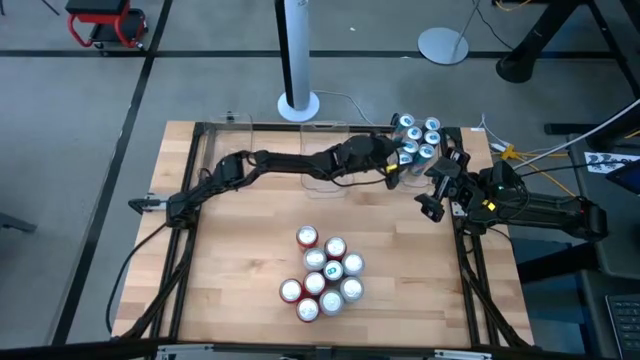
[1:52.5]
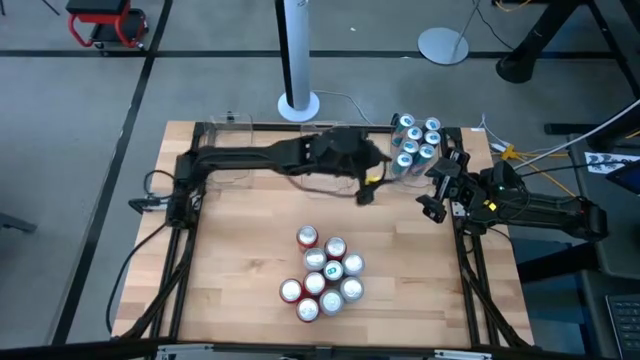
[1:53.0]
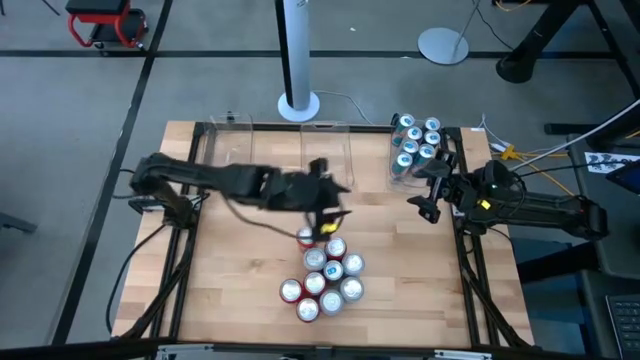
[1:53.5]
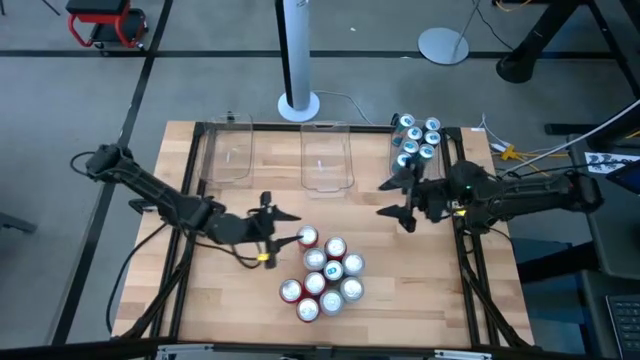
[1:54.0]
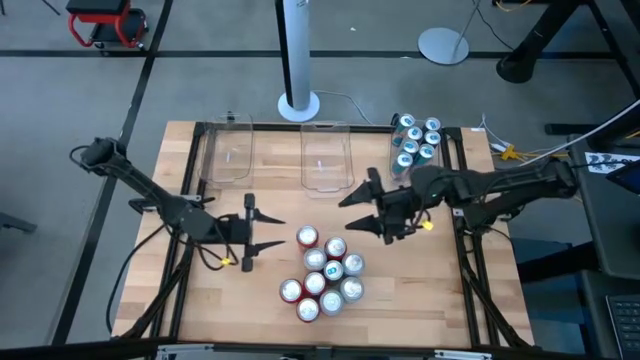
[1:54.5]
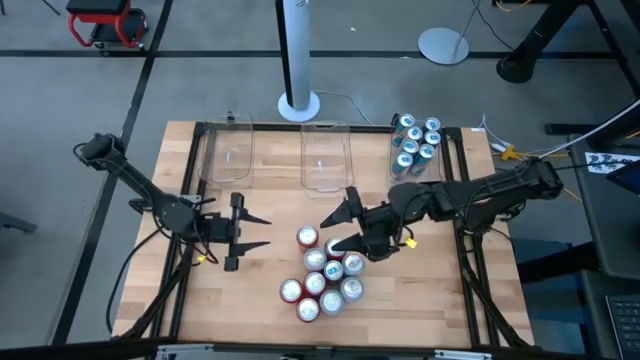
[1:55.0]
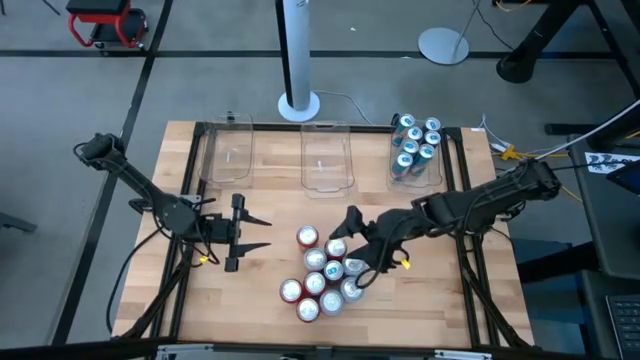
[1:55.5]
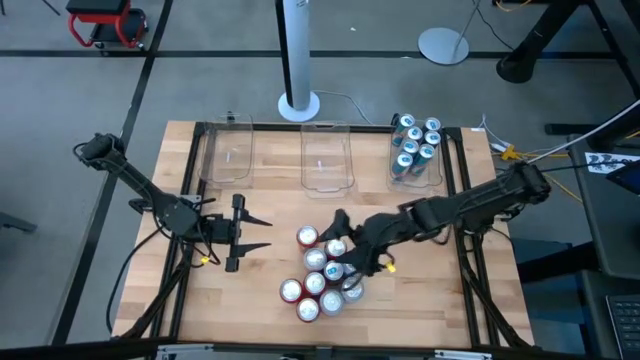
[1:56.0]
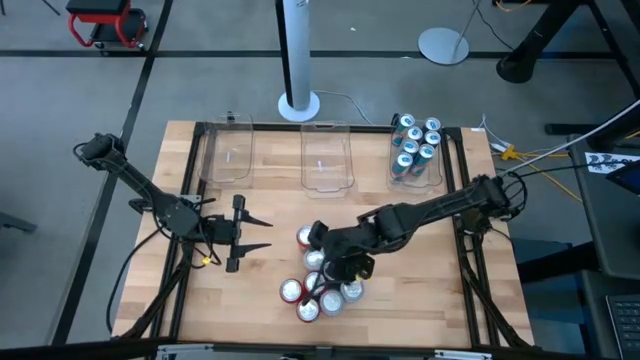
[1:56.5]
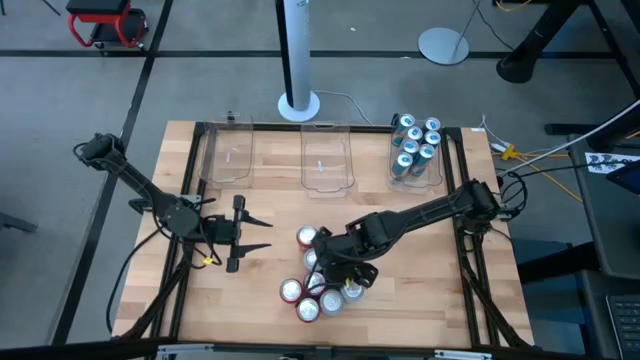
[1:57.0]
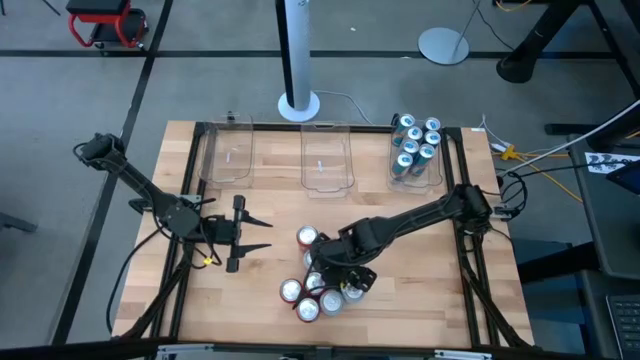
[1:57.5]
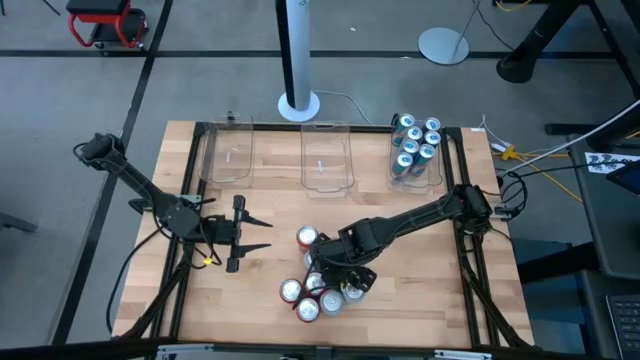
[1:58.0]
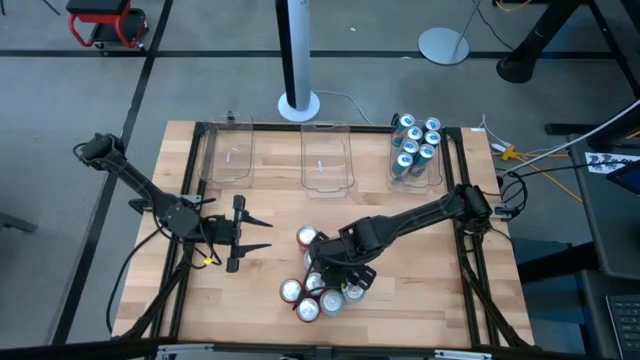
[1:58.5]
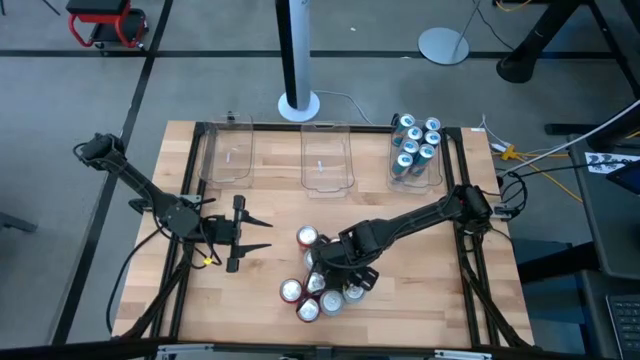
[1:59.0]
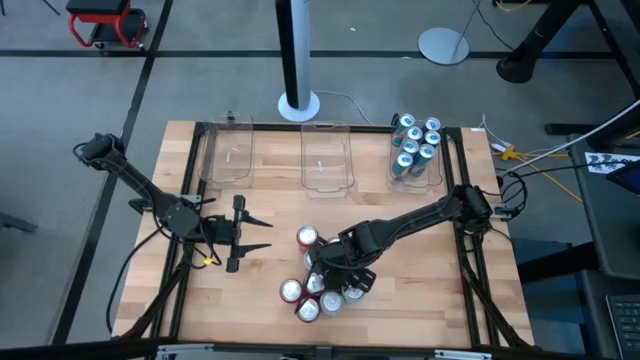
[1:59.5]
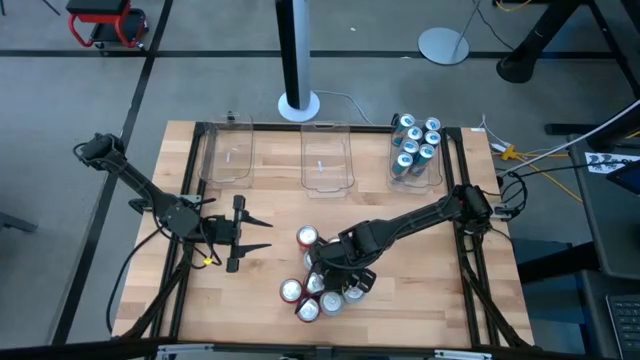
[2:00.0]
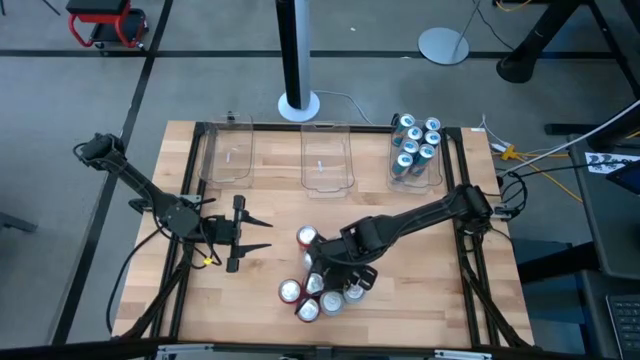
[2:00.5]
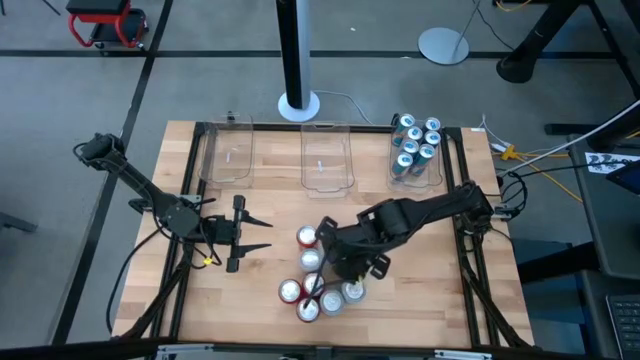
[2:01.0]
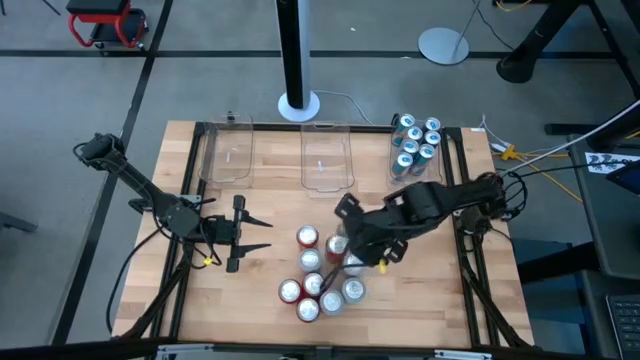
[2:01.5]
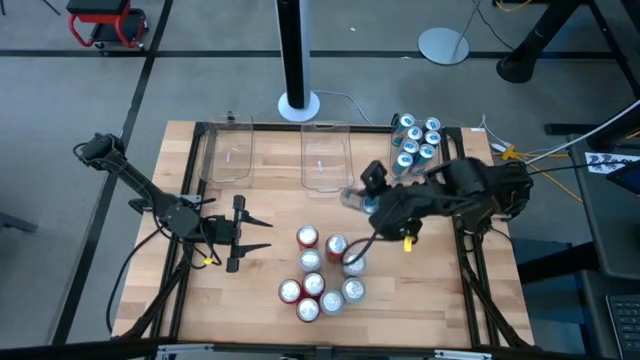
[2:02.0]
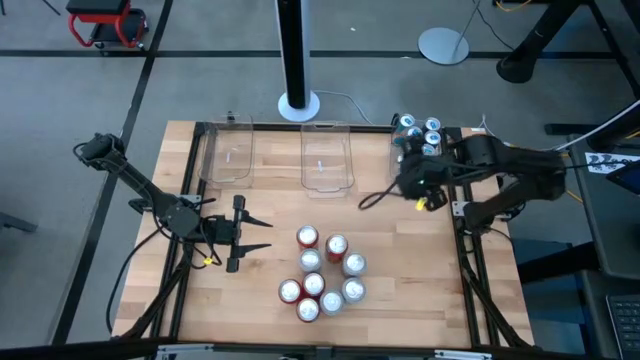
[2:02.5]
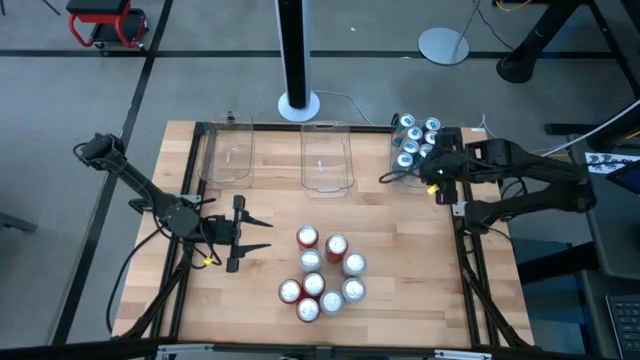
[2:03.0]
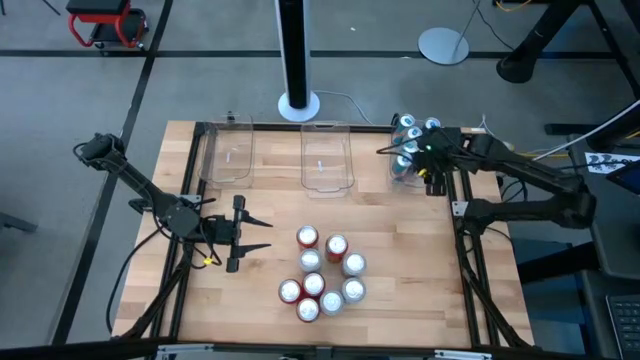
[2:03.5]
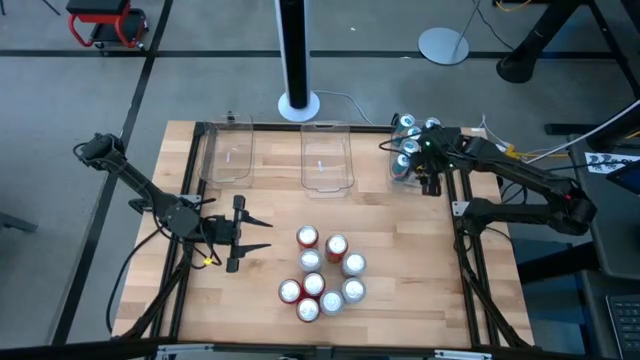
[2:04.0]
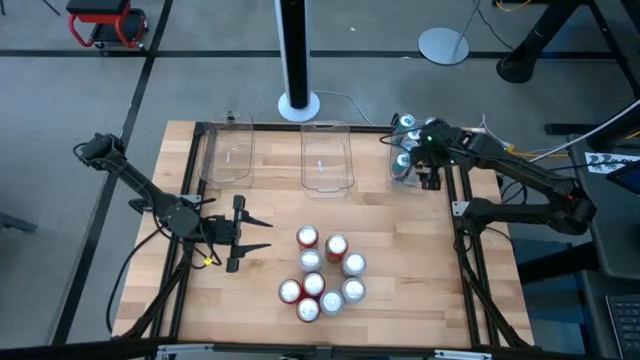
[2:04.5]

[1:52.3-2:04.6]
Task: Sort soda cans
Put the blue soda can into the top right transparent bin

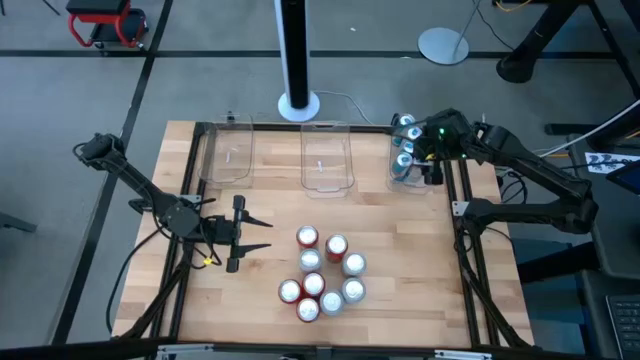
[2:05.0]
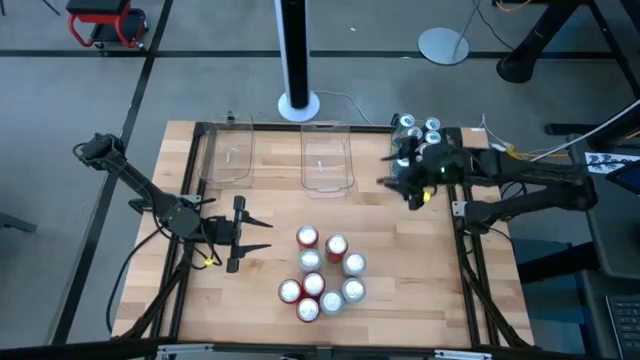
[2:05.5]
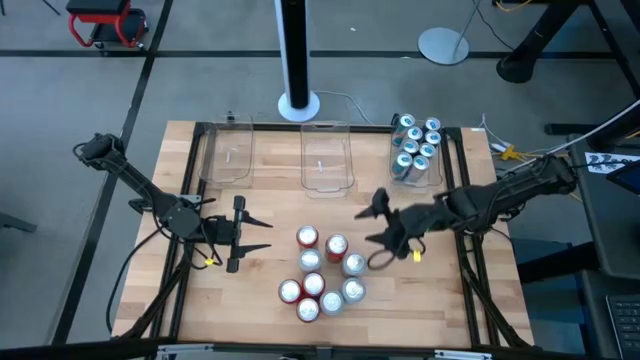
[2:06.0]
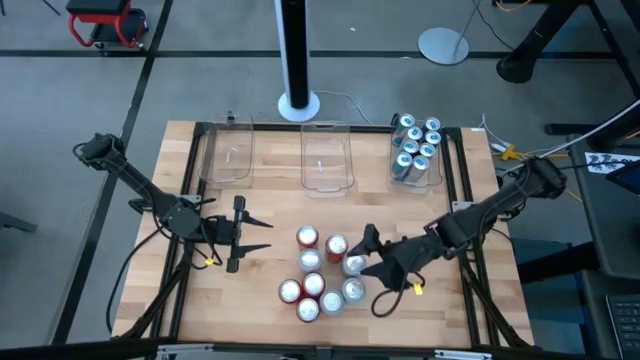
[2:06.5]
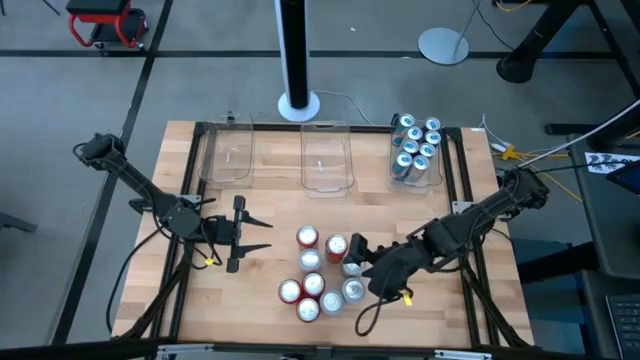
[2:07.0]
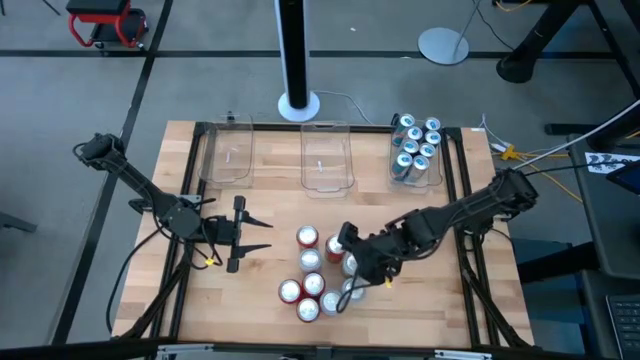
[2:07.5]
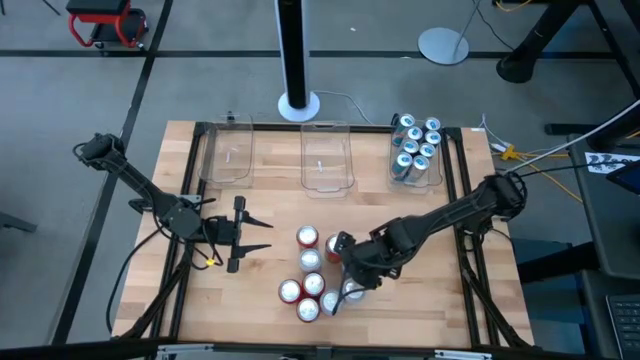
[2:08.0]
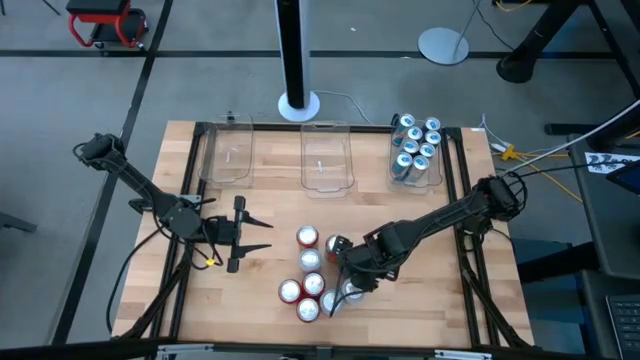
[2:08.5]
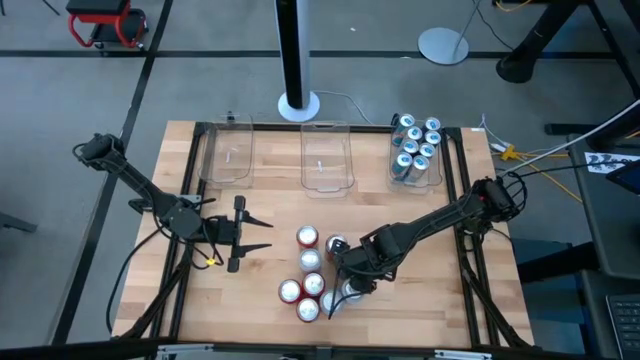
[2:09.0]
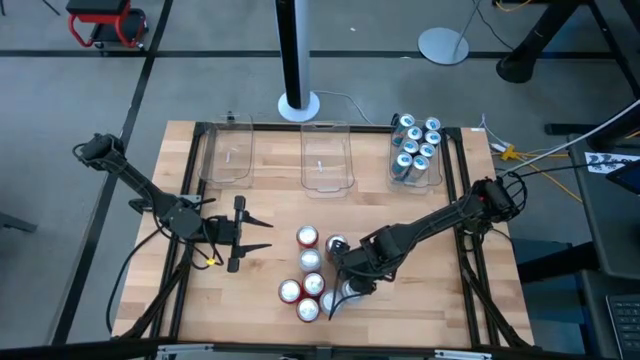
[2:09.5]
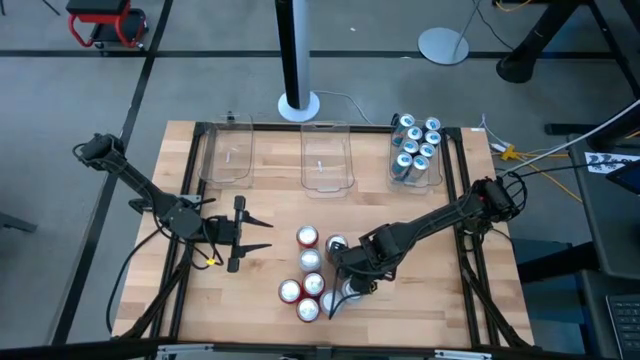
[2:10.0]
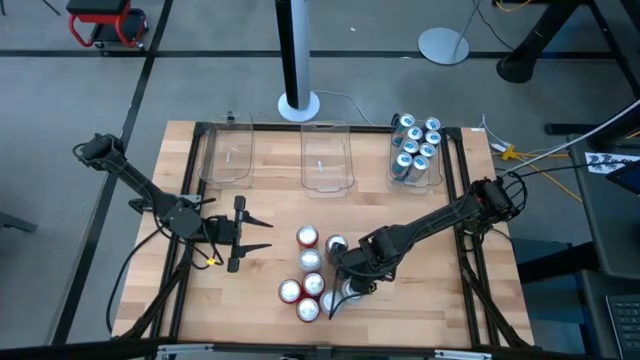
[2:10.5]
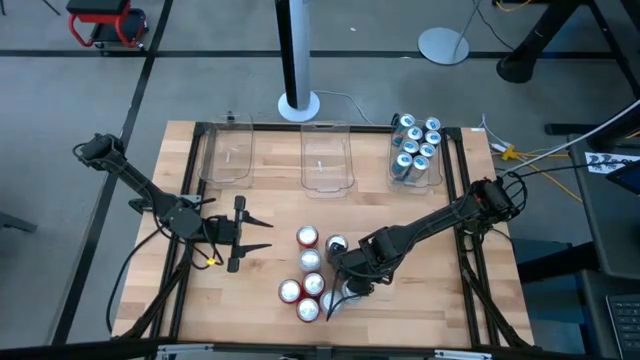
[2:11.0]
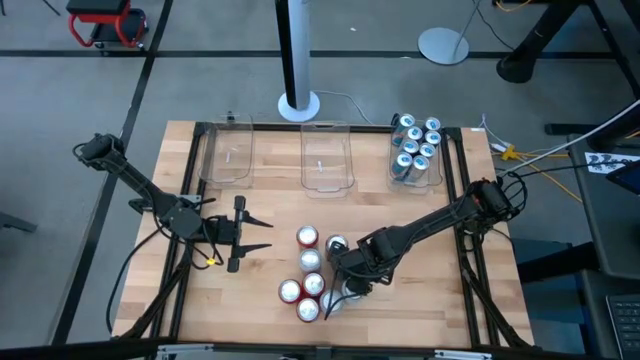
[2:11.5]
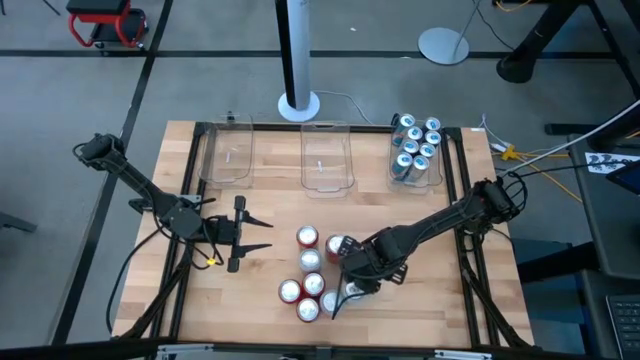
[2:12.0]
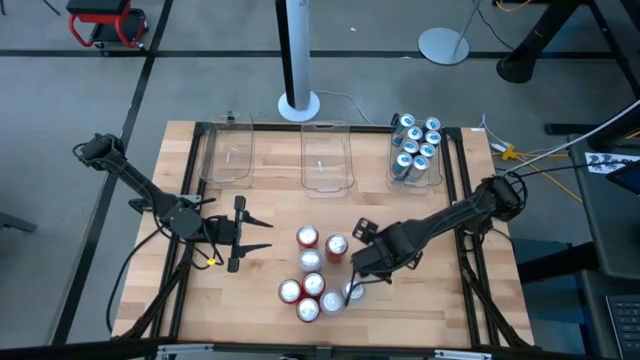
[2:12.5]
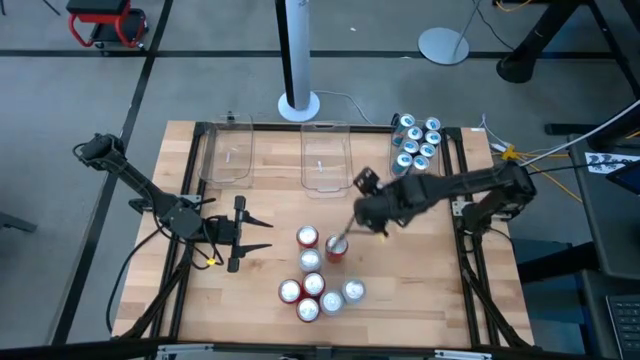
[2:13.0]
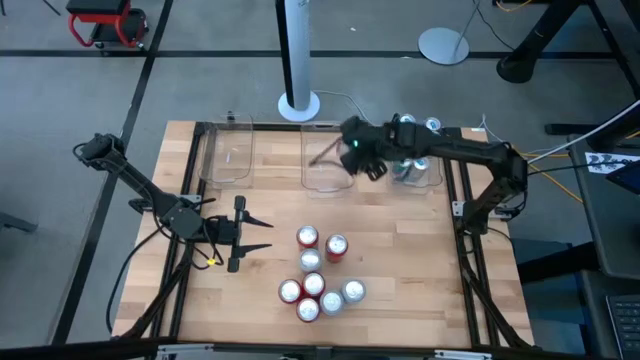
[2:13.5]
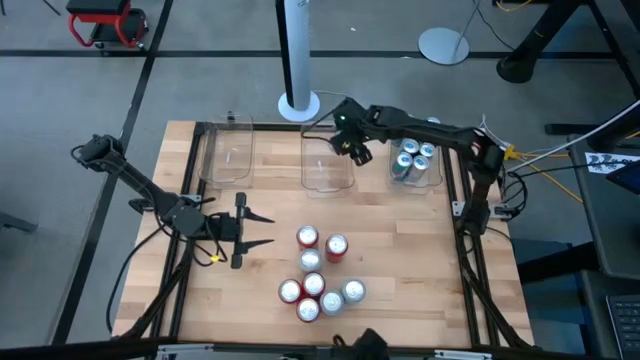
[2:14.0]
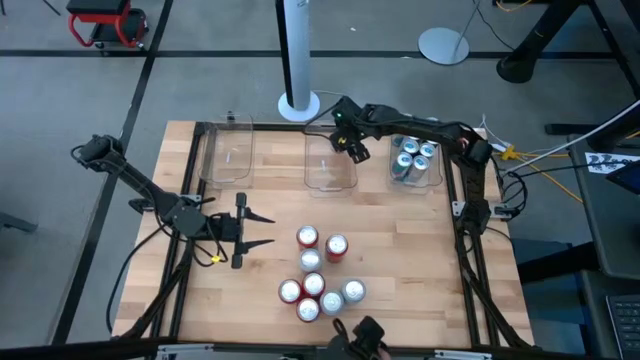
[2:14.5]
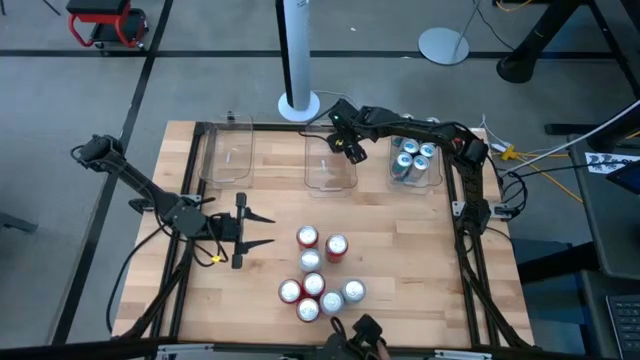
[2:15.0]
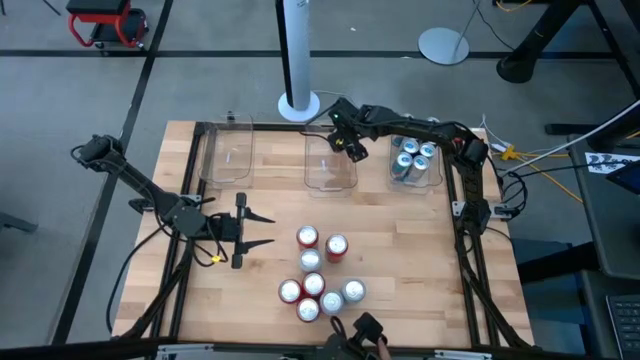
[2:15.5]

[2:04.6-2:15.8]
Put the white pink soda can into the center transparent bin
